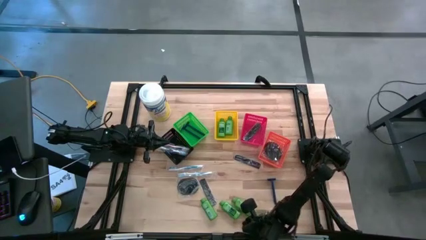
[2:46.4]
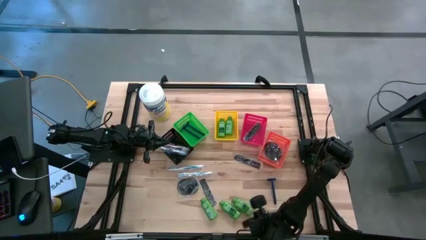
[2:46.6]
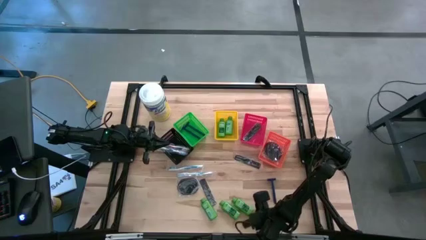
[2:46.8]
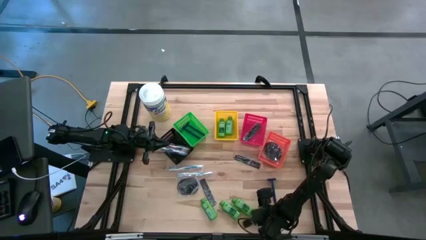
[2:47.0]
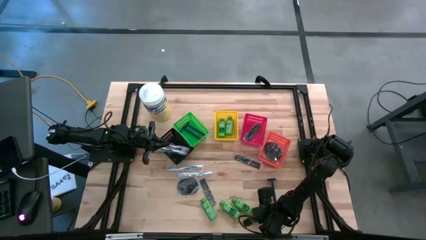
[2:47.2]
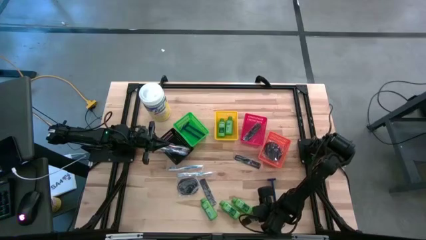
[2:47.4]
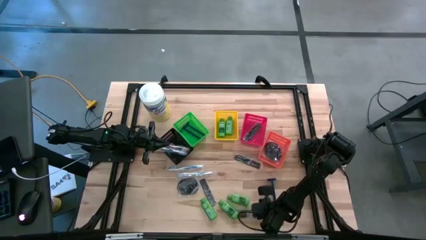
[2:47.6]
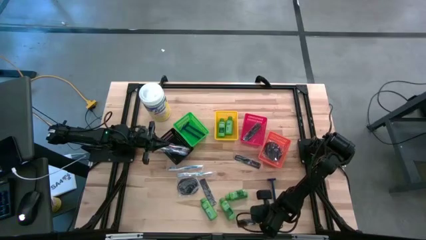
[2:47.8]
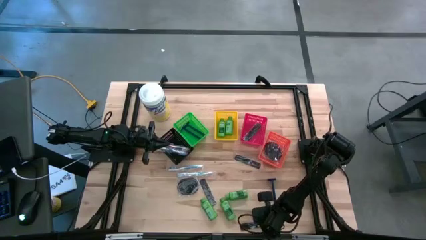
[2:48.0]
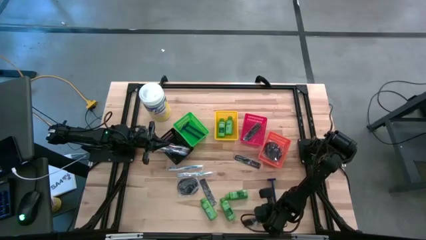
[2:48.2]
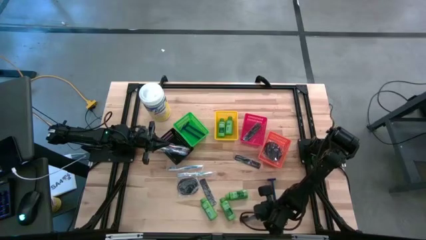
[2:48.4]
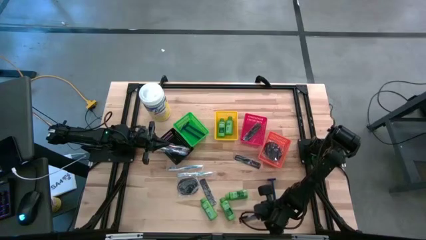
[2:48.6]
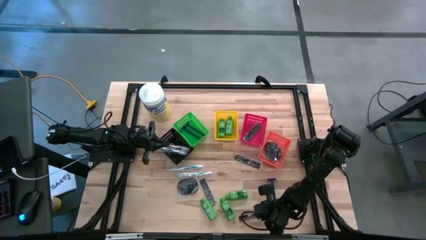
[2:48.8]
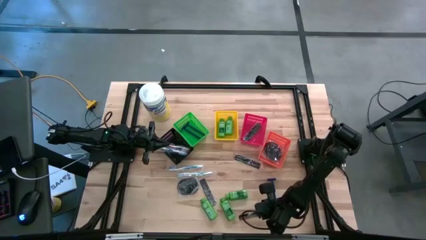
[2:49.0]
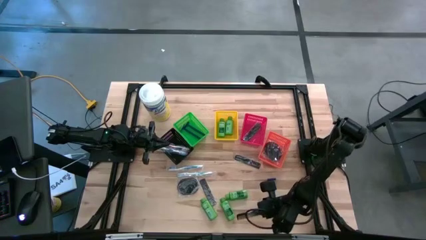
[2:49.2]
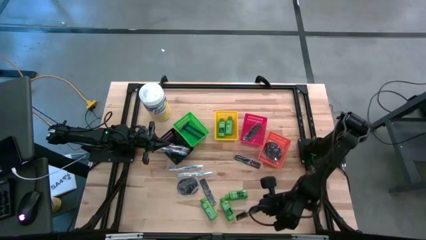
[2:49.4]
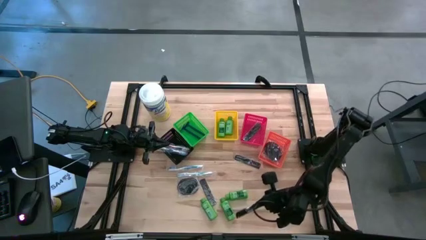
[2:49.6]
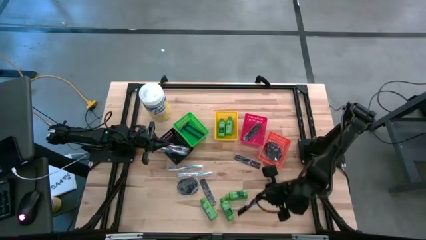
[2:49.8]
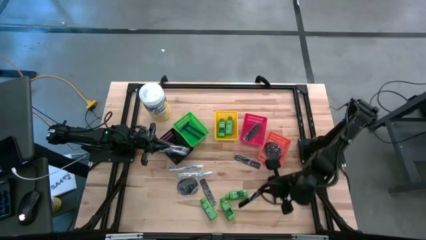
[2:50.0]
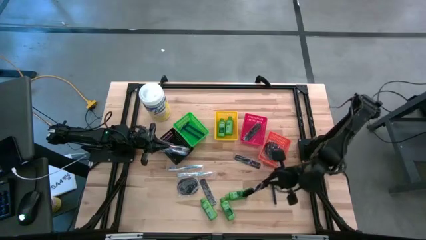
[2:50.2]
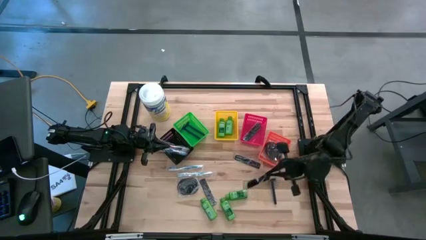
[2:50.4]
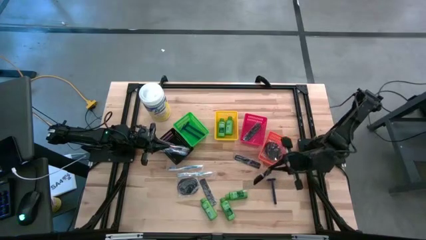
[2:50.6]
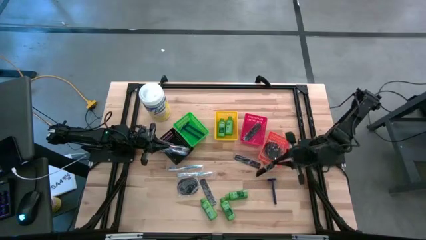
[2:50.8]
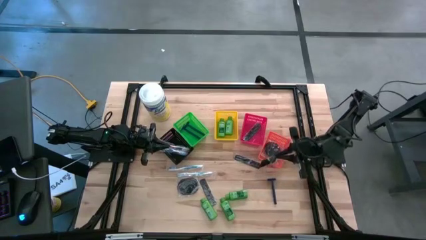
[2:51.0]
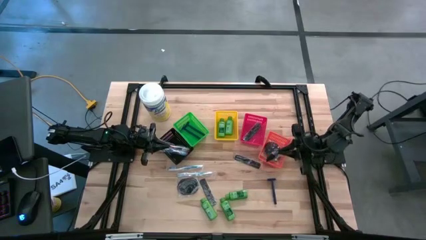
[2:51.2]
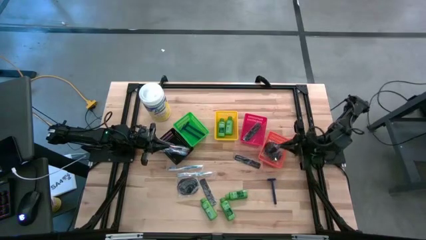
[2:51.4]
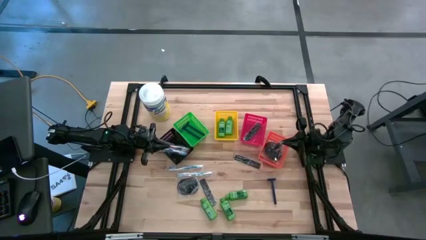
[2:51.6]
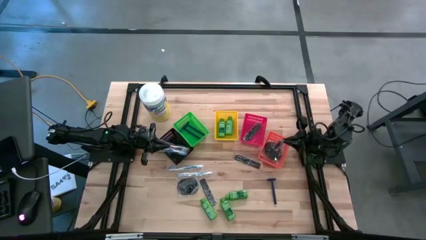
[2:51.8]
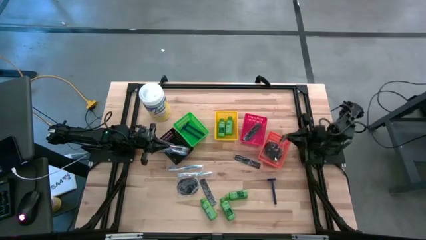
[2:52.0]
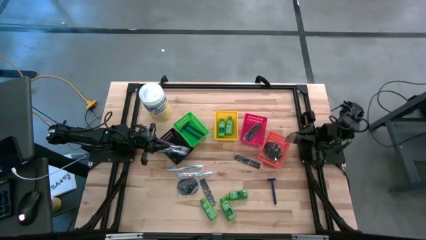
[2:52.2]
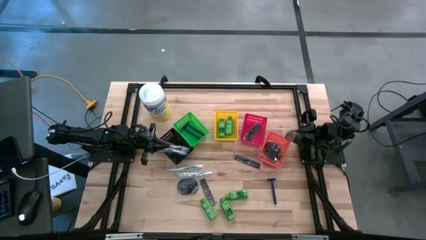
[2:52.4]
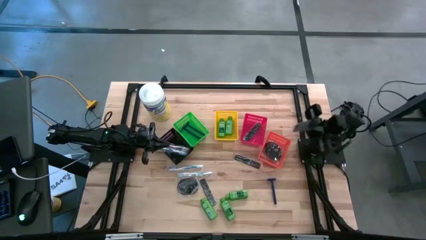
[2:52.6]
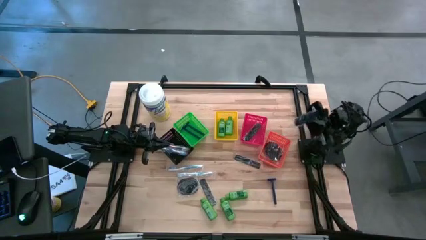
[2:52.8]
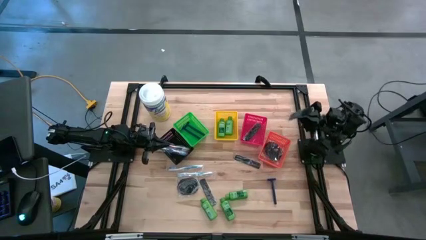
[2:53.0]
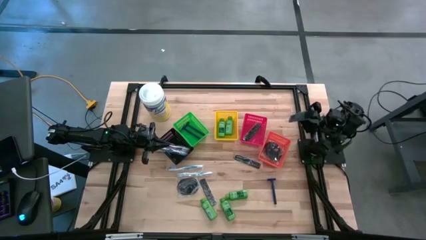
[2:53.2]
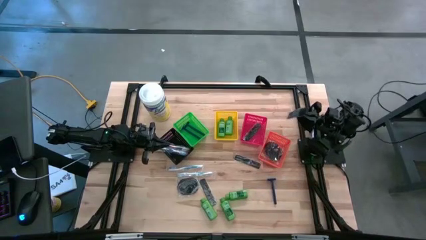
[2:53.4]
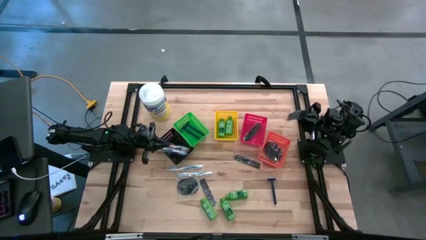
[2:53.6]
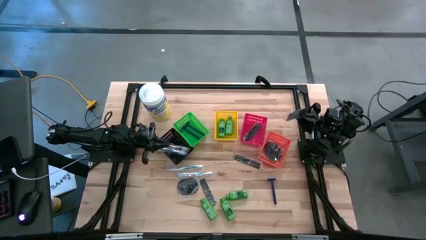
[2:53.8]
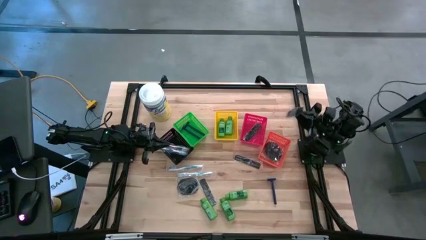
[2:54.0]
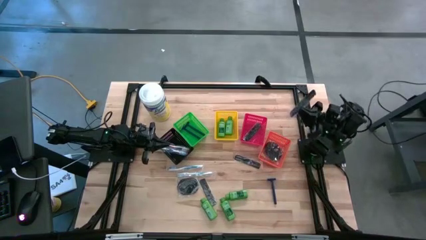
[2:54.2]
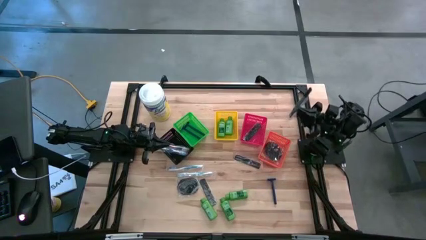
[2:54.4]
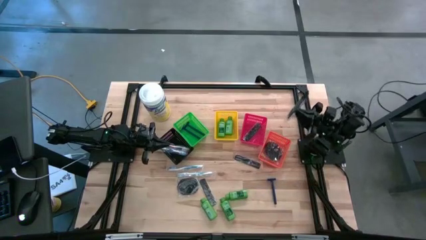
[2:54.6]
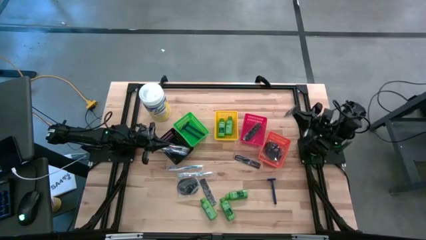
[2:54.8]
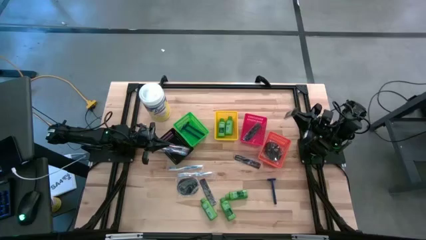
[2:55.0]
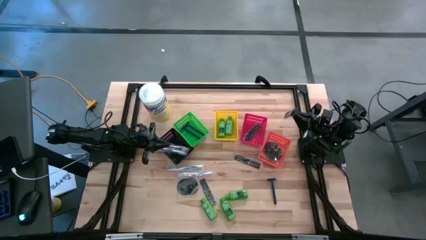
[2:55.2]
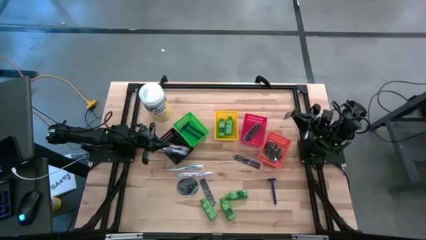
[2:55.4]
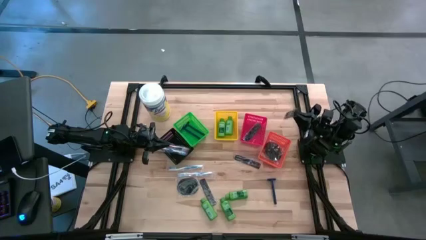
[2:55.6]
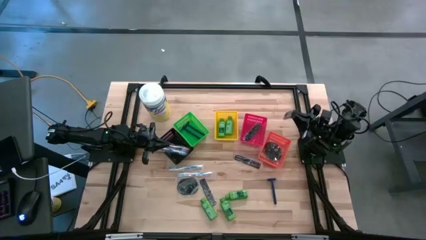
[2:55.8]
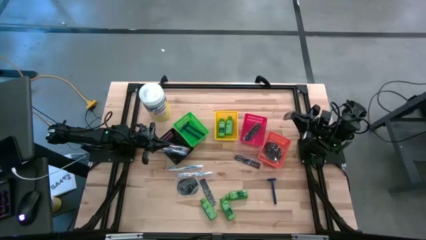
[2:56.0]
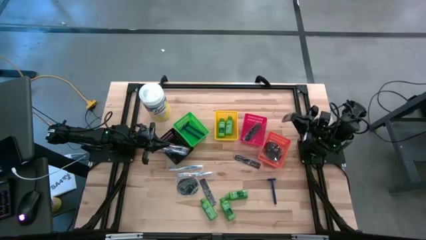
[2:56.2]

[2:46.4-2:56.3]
Task: Pick & Place Travel size toiletries
Put the bottom black hair comb into the red bin

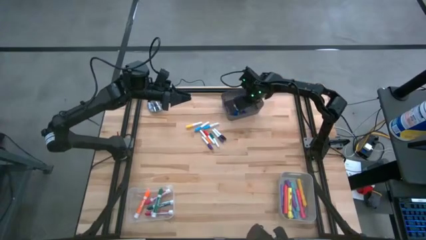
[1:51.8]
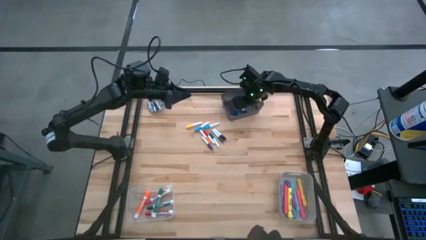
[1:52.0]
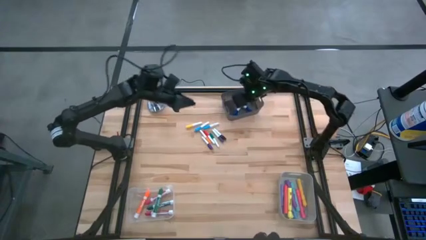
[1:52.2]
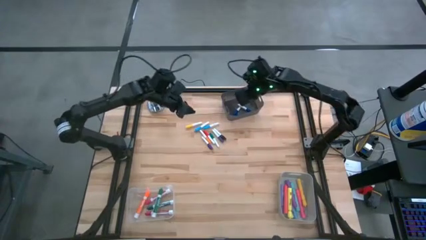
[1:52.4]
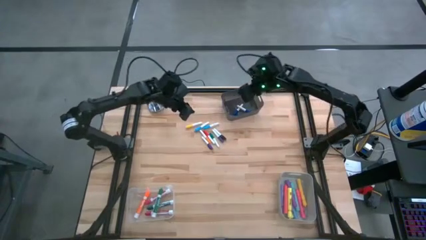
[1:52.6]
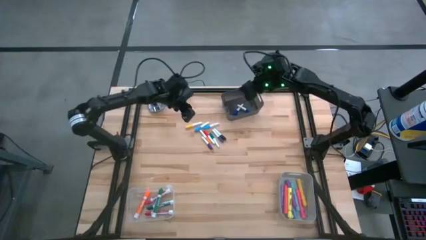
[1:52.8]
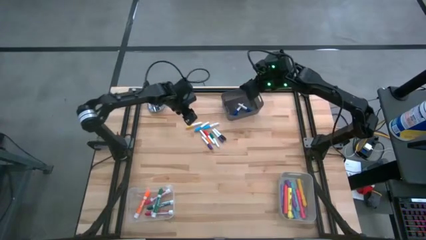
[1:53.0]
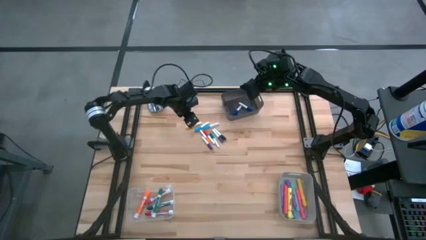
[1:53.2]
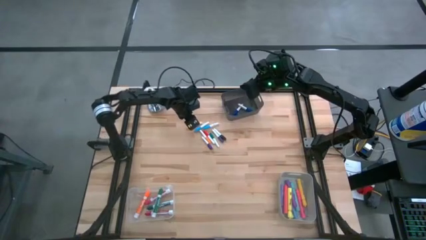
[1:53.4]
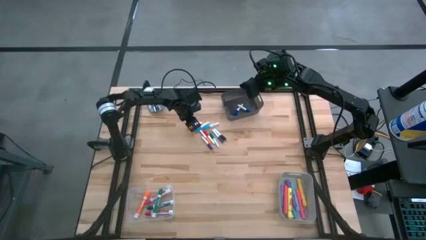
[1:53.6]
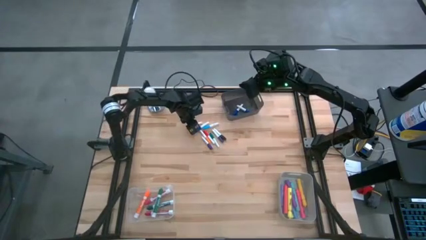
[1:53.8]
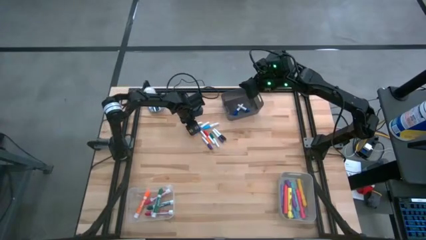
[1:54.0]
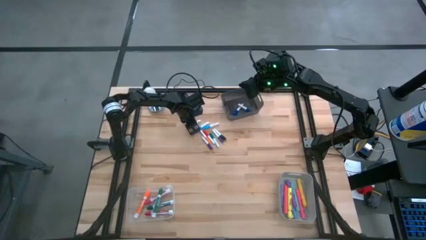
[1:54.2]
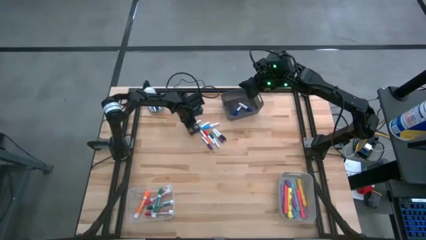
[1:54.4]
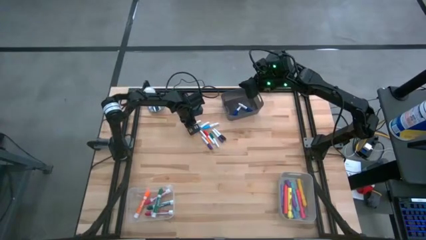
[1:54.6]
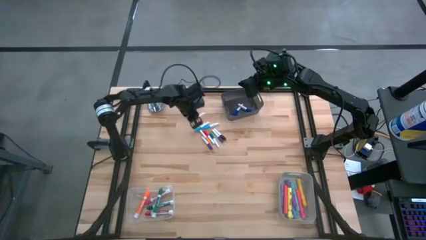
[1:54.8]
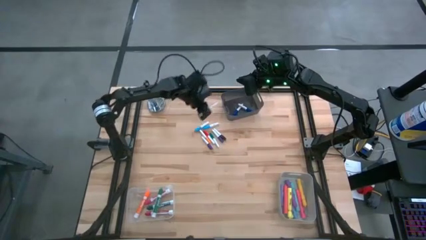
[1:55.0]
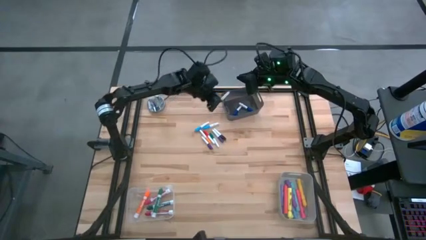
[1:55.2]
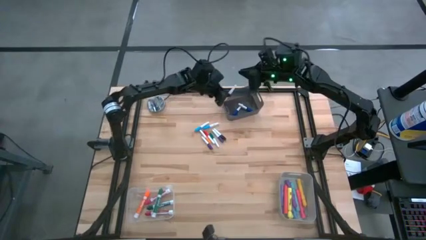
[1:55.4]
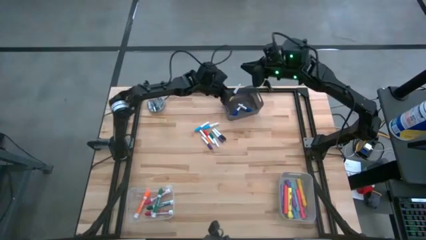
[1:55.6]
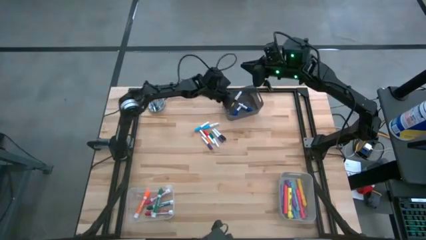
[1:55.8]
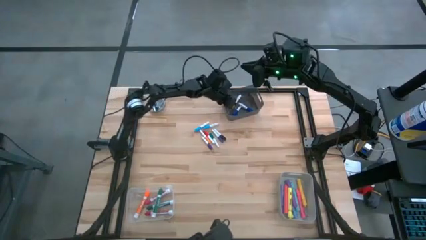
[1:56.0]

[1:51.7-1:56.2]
Task: Pick & Place Markers
Put the small yellow highlighter pen into the black bin

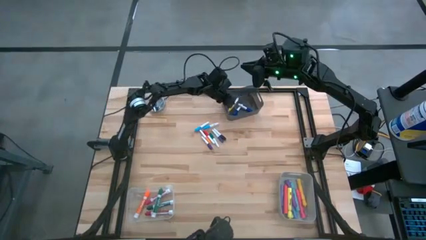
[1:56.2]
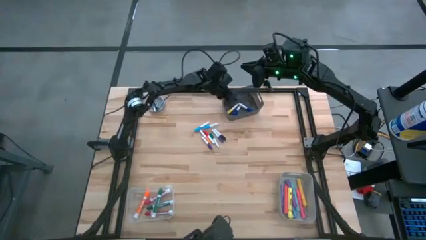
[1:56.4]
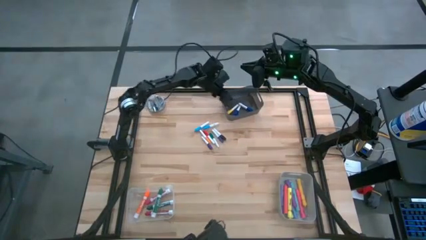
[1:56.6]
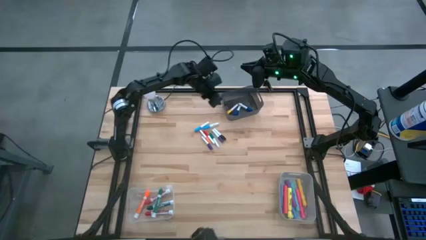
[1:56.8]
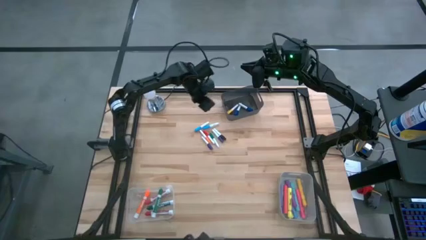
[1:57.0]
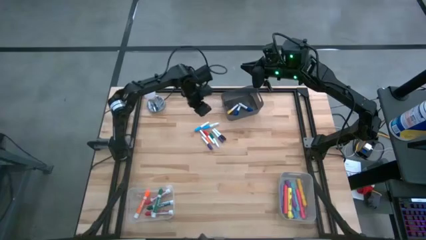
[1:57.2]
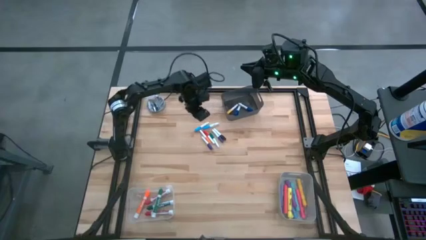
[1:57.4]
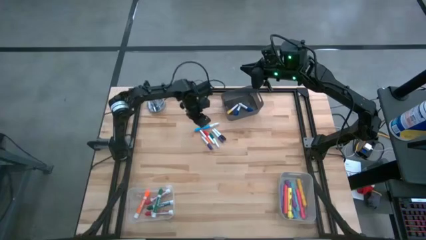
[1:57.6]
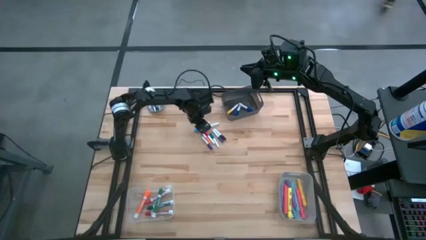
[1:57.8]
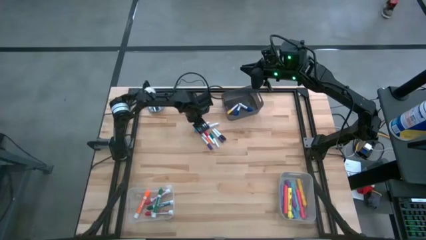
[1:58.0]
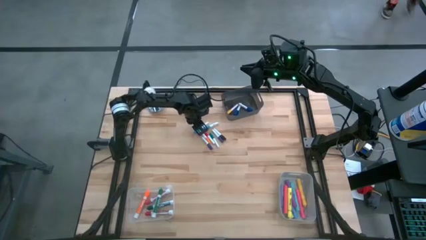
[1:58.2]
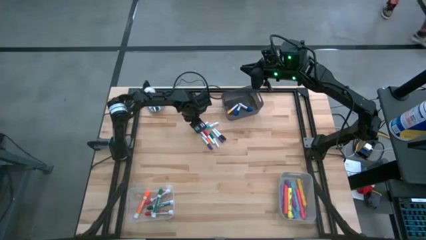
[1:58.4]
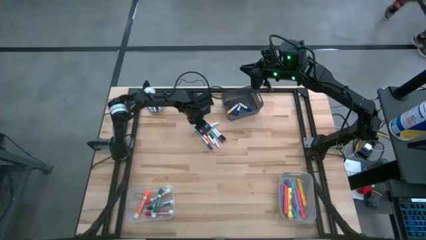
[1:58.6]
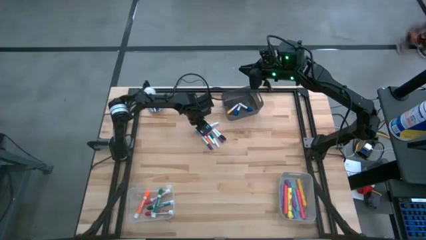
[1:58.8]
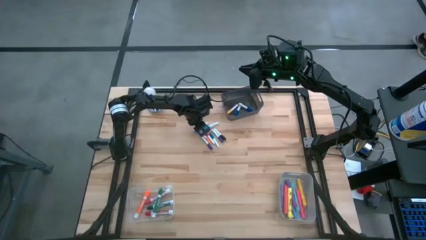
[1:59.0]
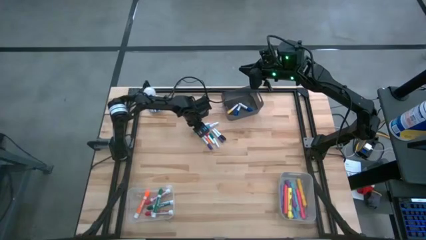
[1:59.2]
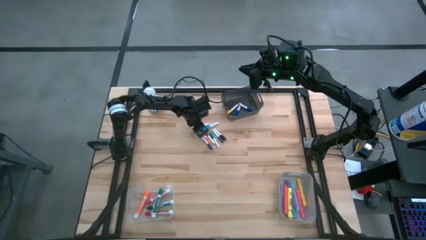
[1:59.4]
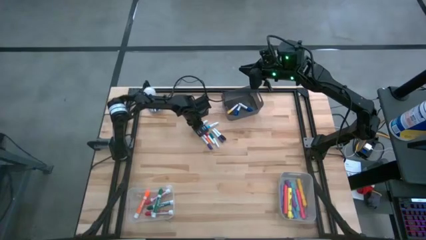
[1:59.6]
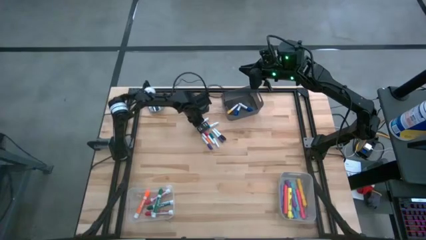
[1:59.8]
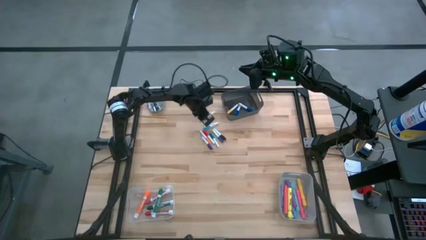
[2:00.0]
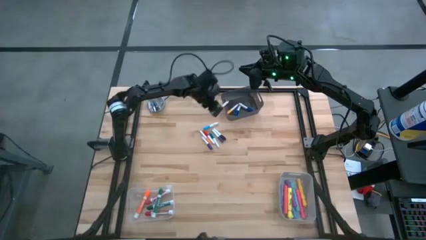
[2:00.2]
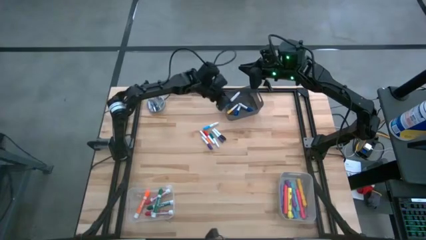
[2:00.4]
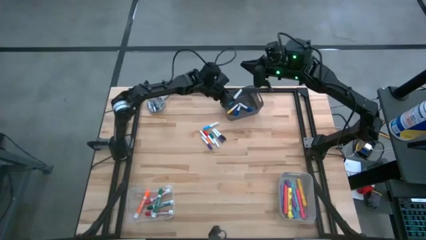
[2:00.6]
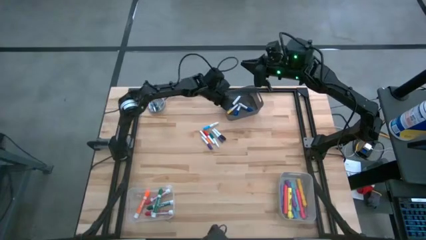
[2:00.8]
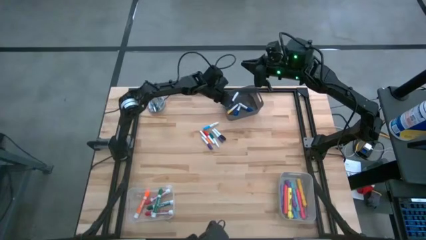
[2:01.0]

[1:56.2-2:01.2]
Put the top small light blue highlighter pen into the black bin
